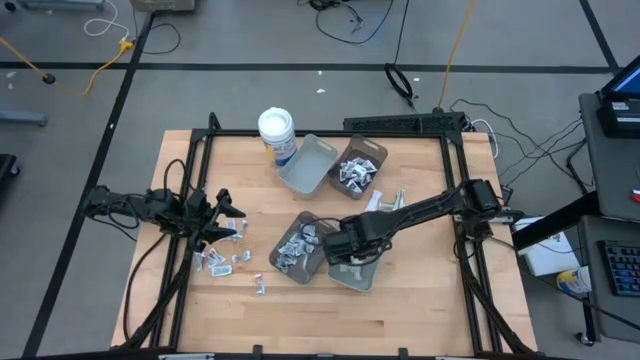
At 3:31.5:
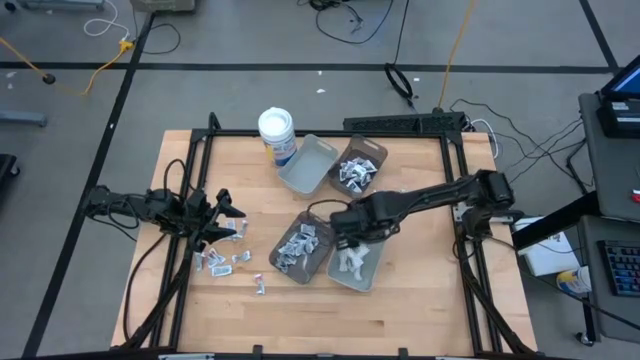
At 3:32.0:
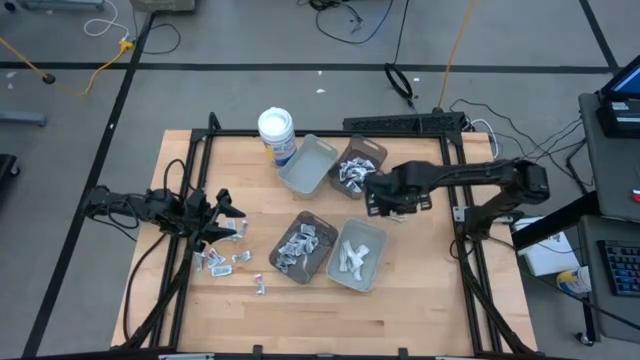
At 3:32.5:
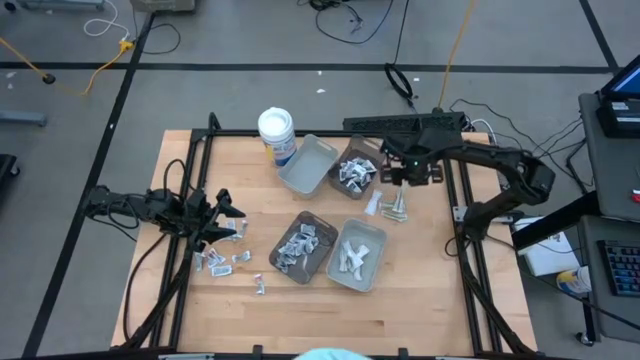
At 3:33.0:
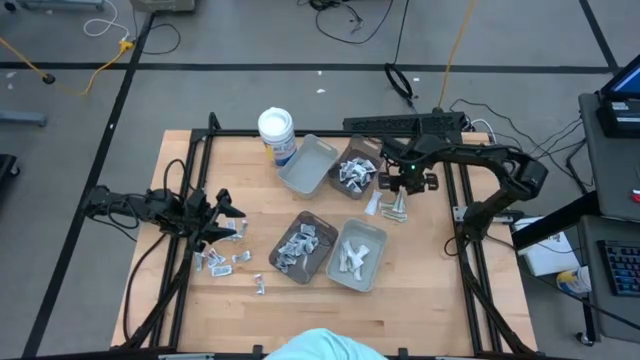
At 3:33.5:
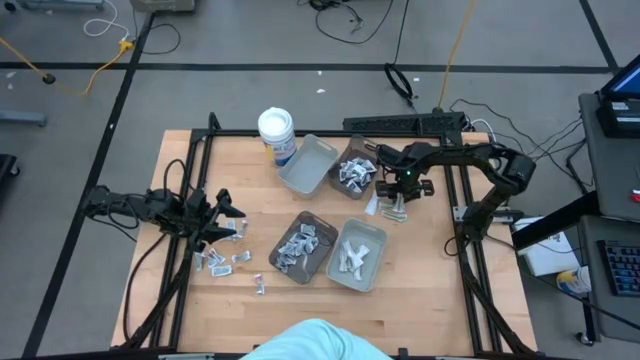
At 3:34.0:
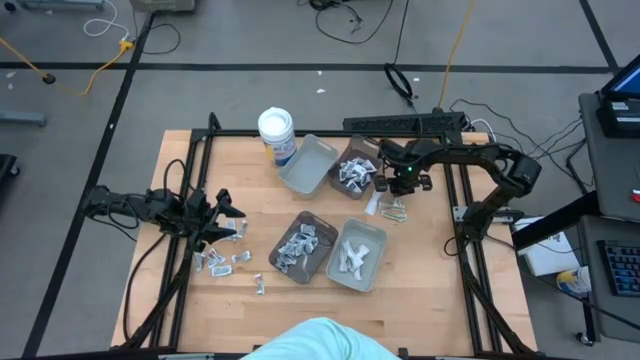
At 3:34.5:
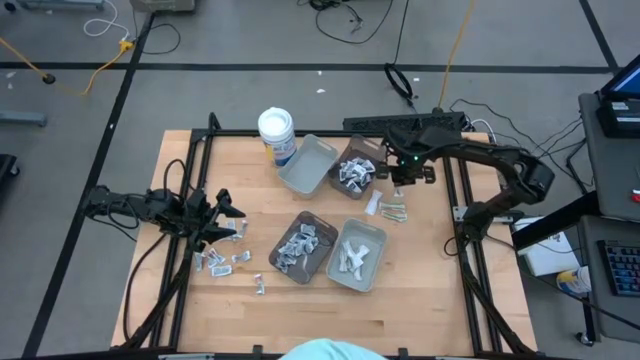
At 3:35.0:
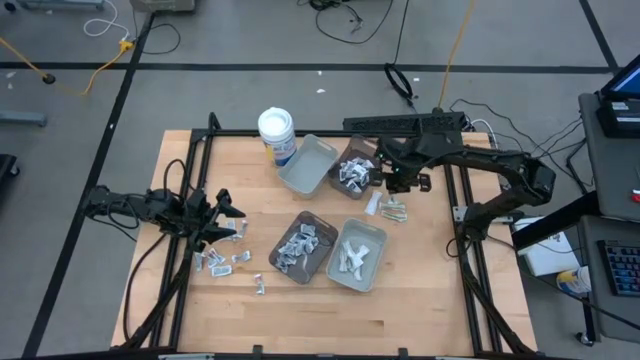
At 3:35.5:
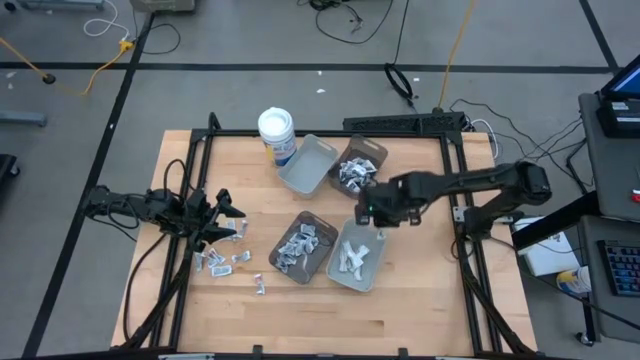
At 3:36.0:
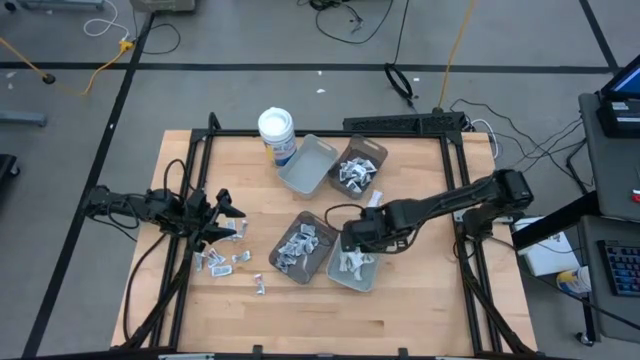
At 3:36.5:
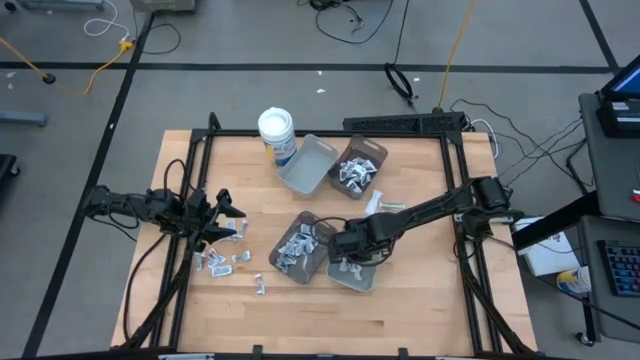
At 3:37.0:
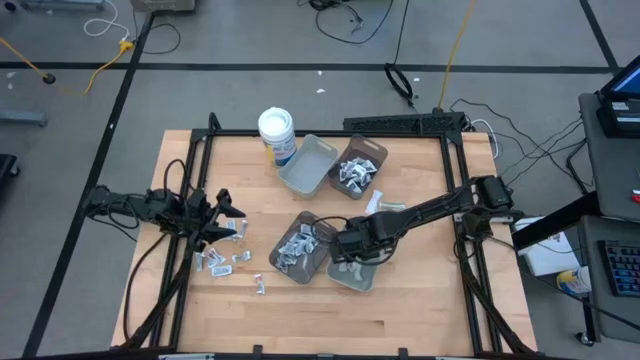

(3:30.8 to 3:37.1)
Task: Pick & Place First Aid Supplies
Put the green bandage into the bottom gray bin

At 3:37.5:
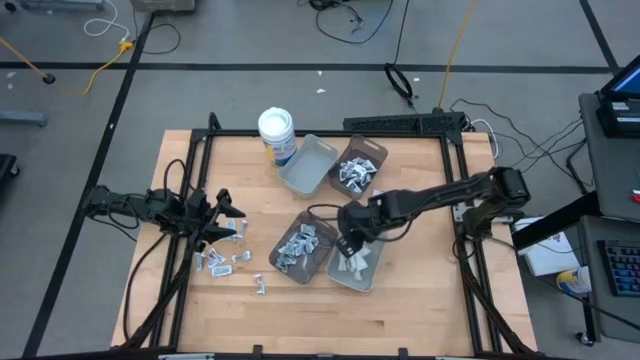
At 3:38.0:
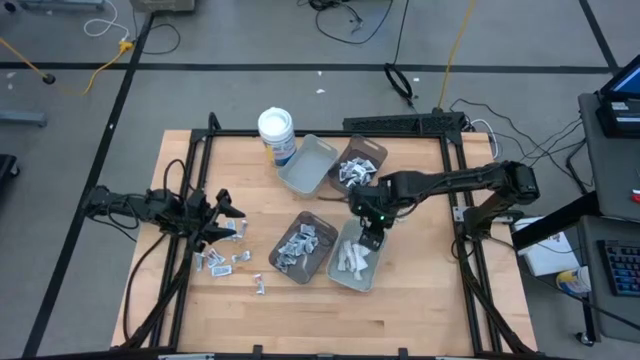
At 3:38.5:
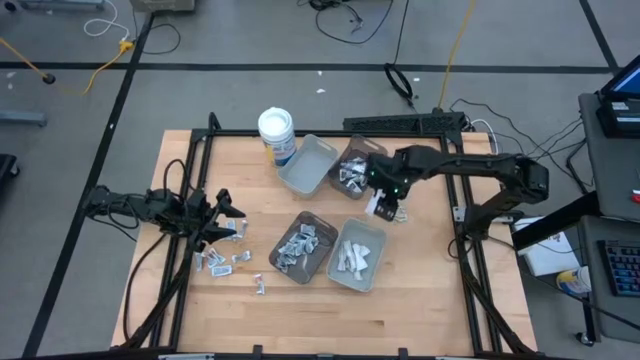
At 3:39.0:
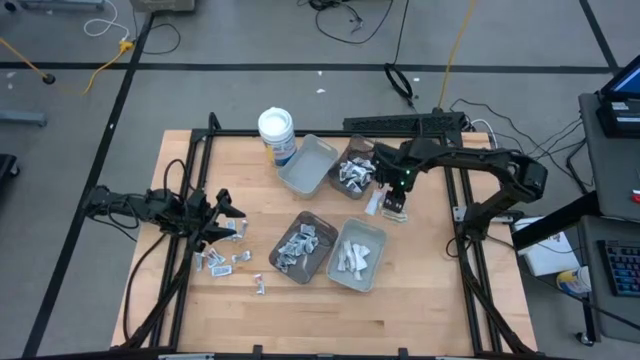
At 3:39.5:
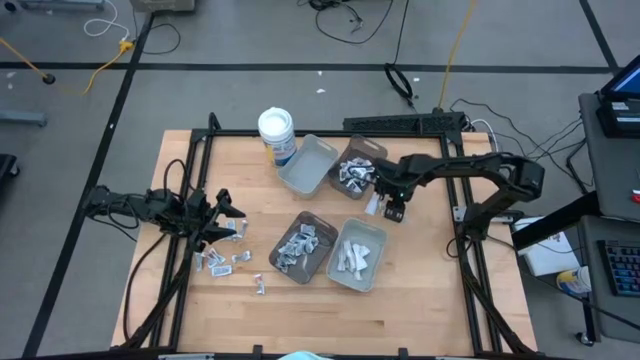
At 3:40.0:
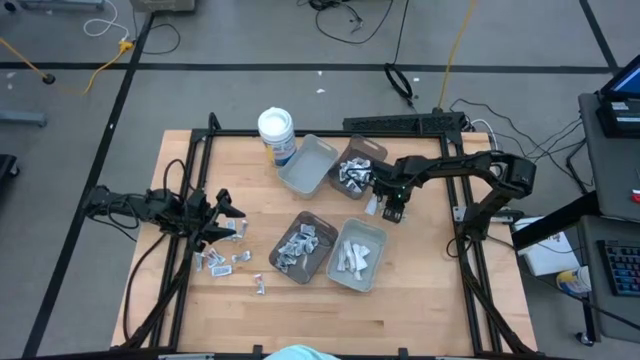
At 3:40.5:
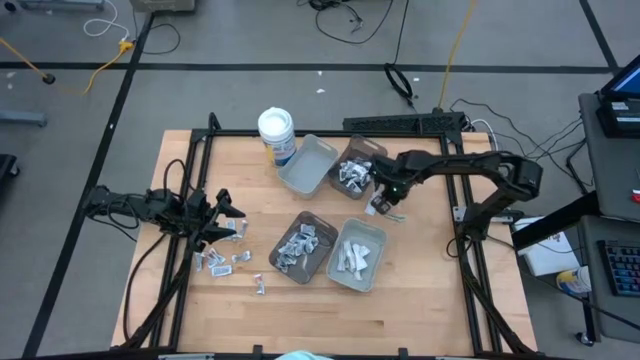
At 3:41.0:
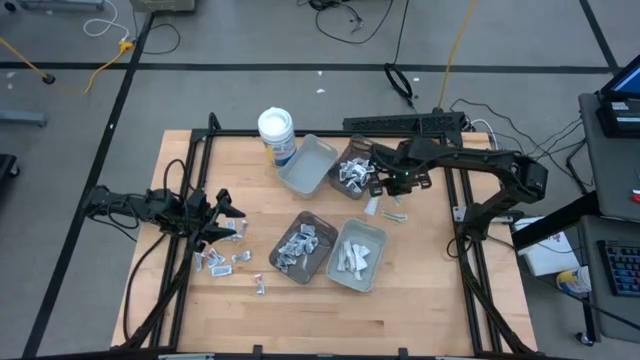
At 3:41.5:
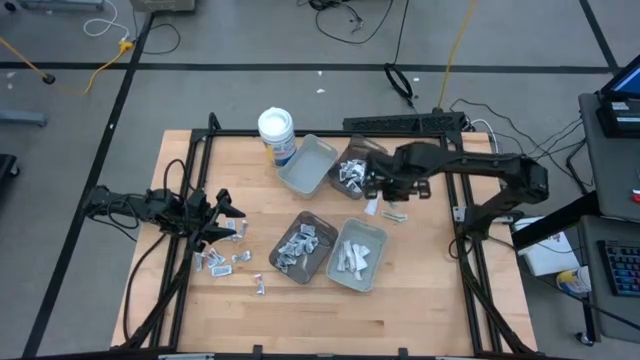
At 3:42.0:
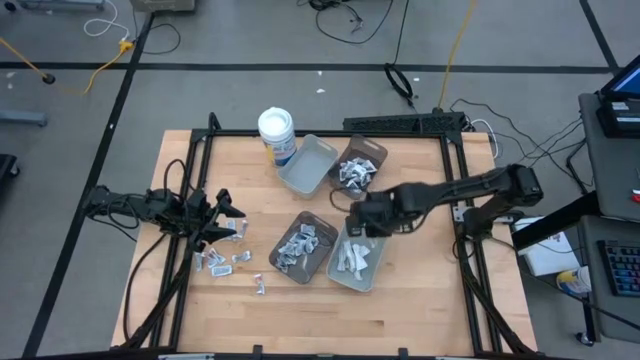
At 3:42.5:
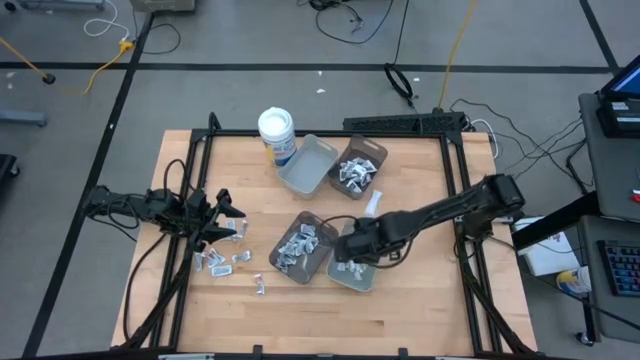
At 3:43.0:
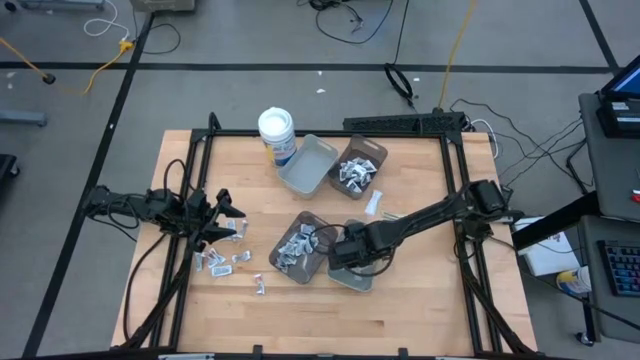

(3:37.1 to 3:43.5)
Put the green bandage into the bottom gray bin

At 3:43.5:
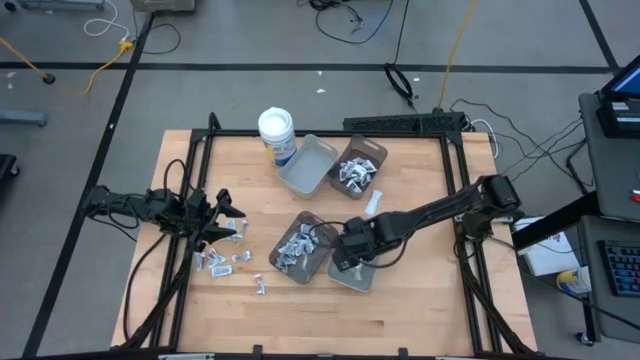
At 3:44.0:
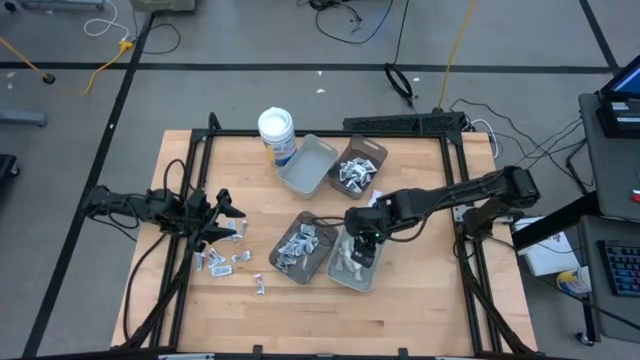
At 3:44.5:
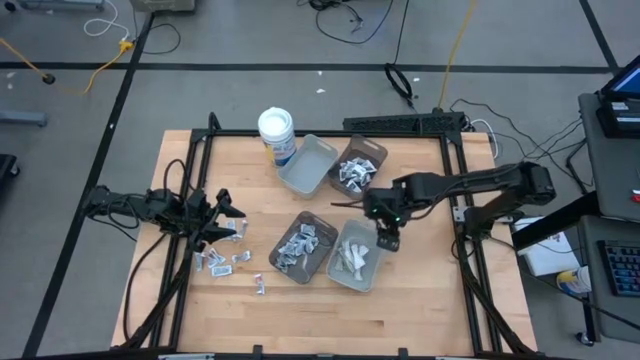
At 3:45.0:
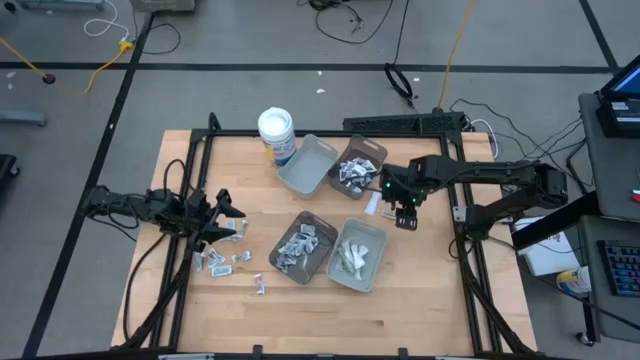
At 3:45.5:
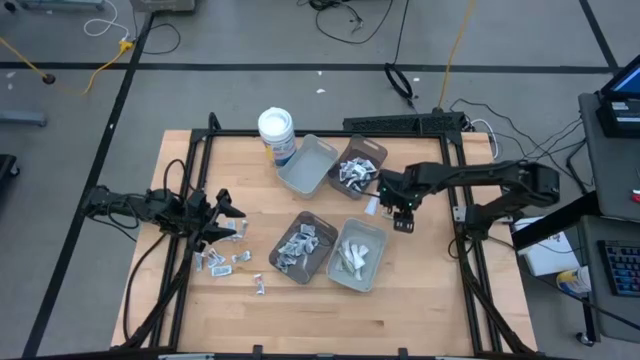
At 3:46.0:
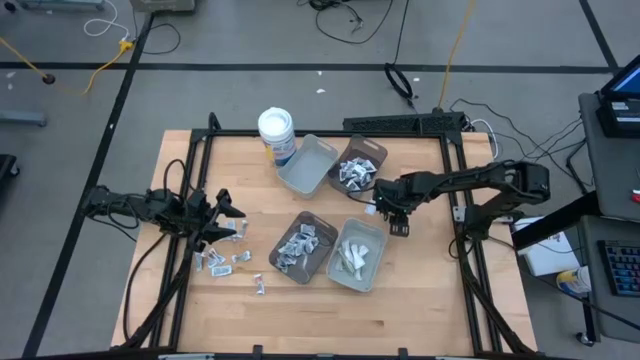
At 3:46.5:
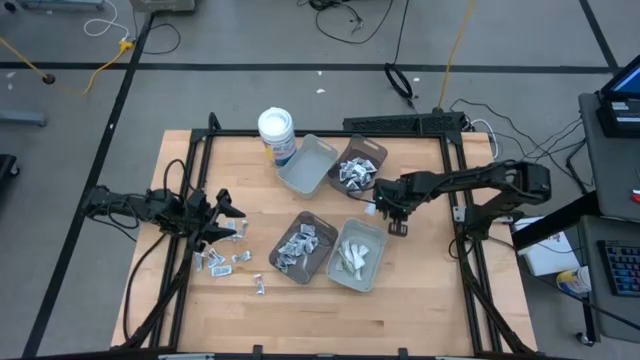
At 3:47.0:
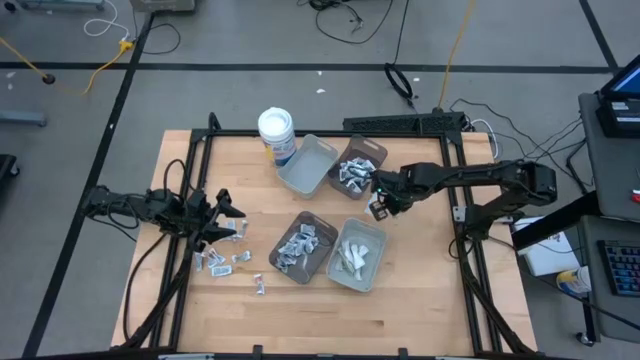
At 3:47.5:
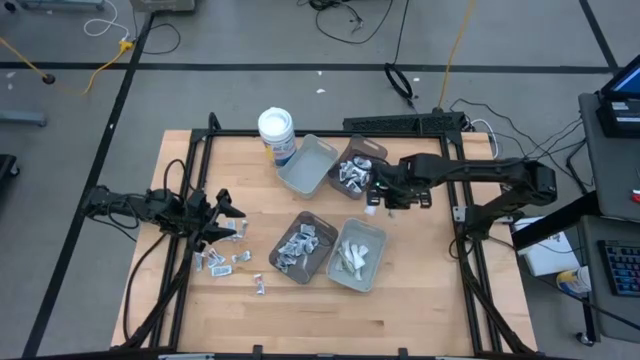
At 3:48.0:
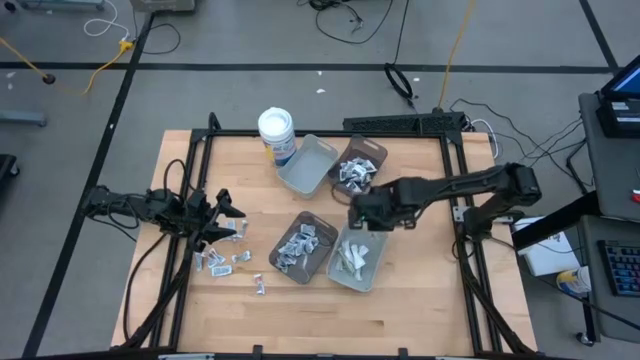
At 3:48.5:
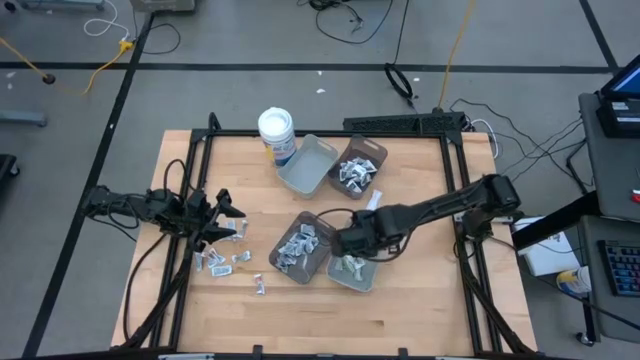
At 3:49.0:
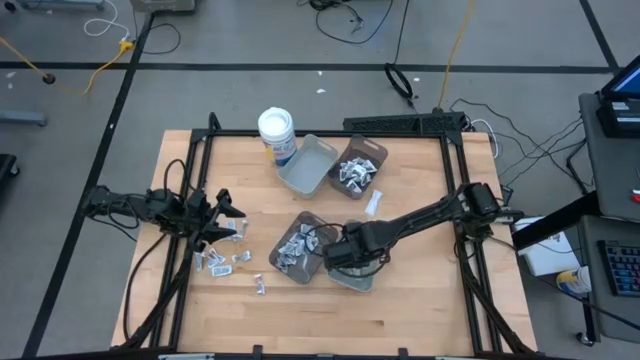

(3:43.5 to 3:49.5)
Put the green bandage into the bottom gray bin

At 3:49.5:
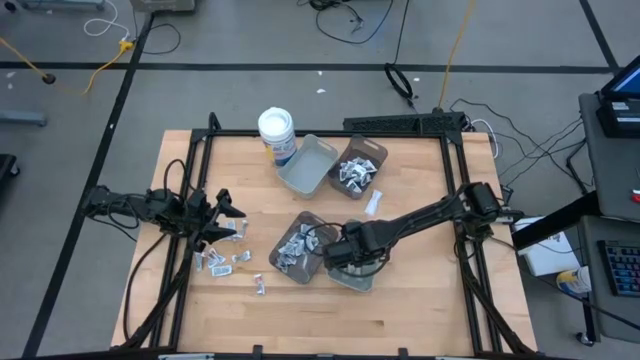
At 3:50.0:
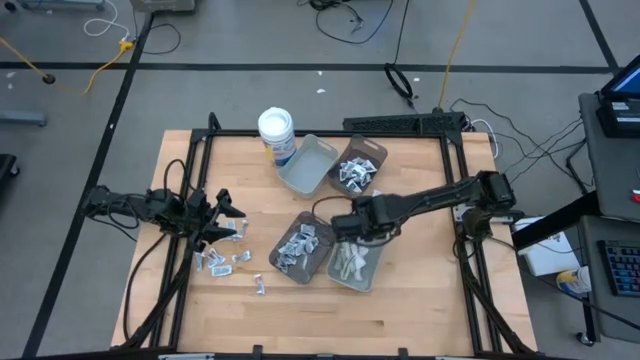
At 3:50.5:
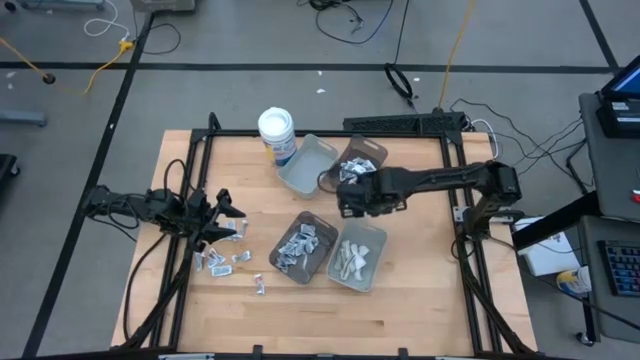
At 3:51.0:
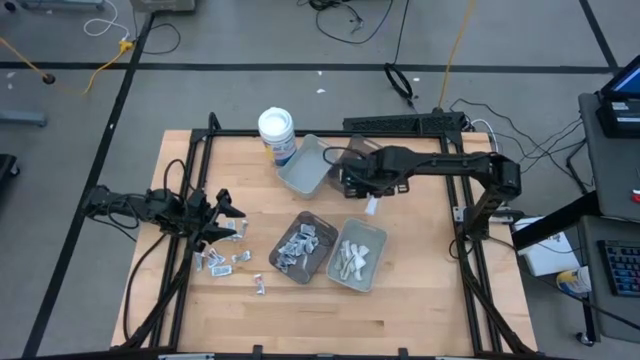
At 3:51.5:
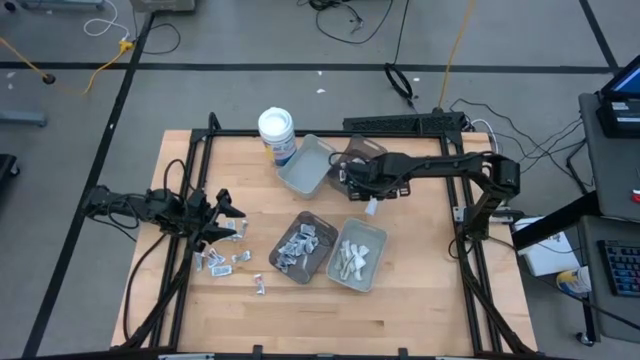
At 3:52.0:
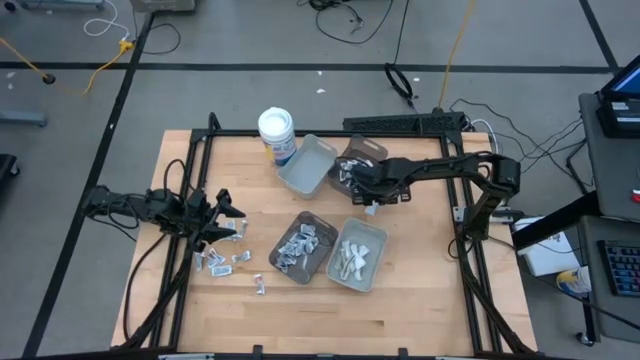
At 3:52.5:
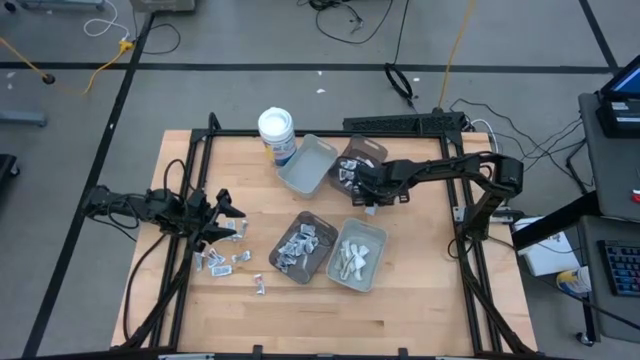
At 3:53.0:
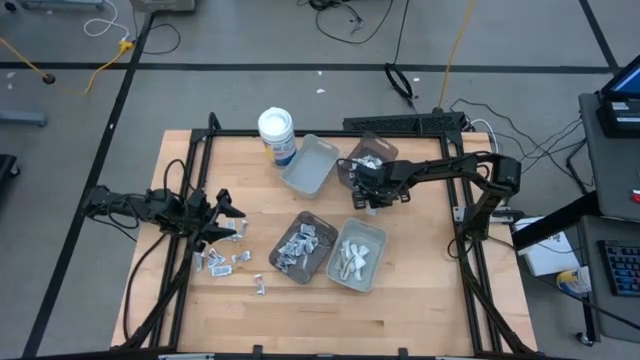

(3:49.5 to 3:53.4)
Put the green bandage into the bottom gray bin
